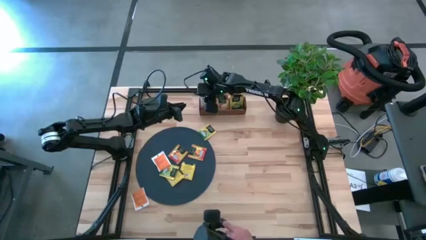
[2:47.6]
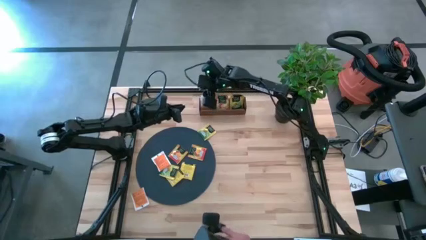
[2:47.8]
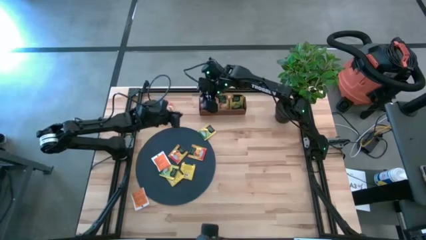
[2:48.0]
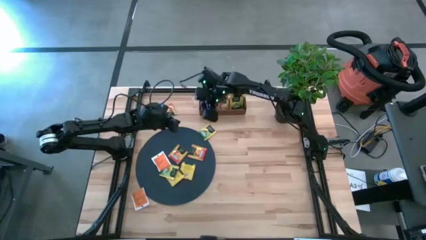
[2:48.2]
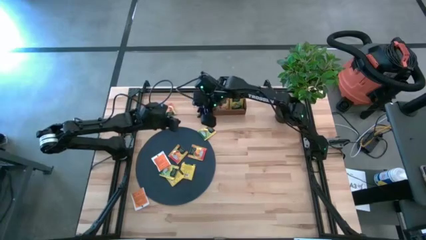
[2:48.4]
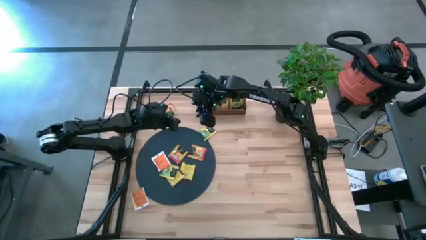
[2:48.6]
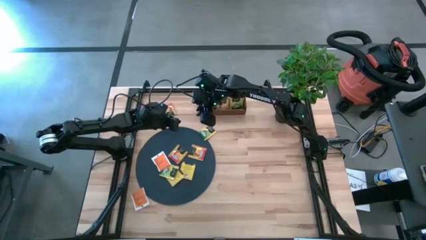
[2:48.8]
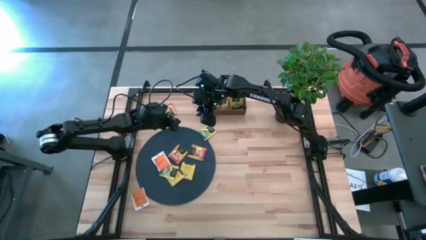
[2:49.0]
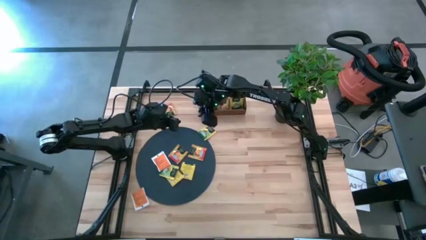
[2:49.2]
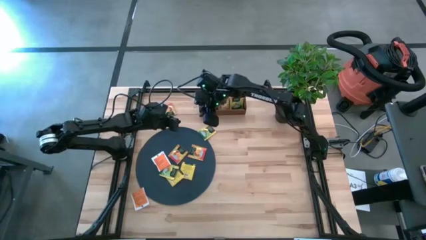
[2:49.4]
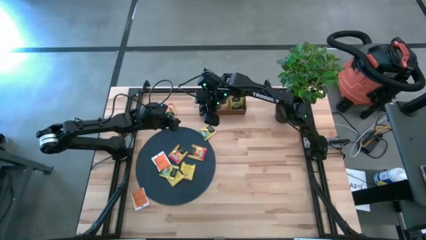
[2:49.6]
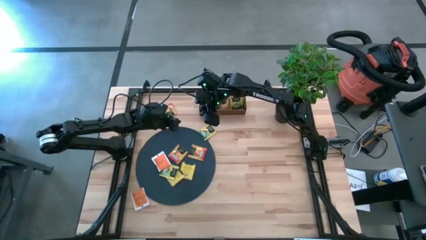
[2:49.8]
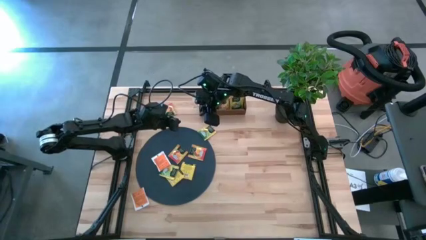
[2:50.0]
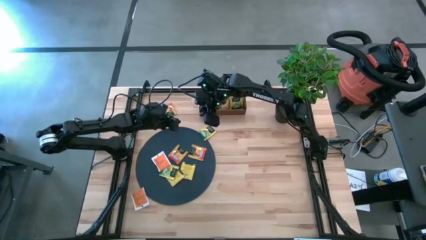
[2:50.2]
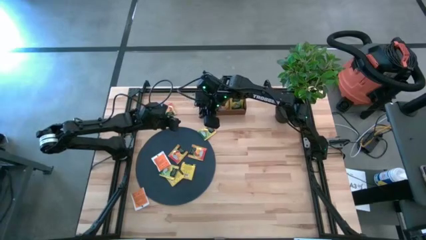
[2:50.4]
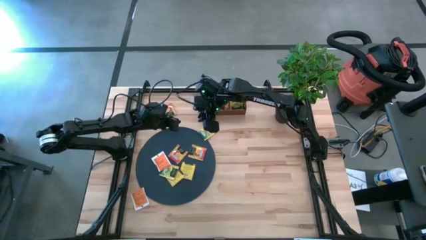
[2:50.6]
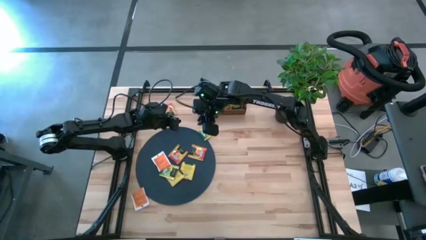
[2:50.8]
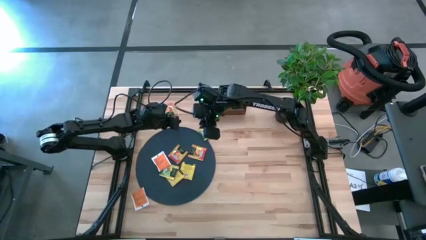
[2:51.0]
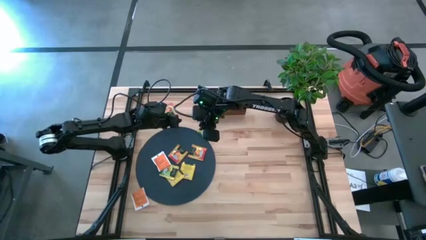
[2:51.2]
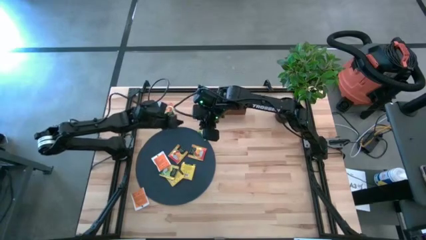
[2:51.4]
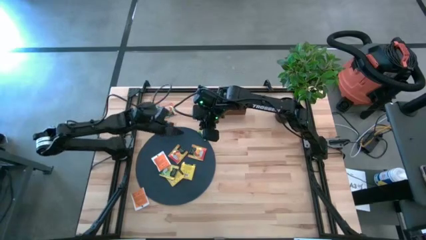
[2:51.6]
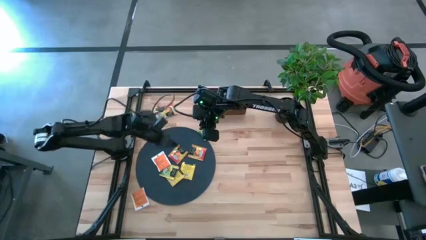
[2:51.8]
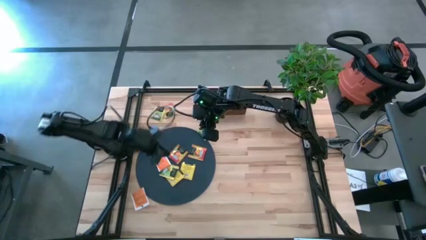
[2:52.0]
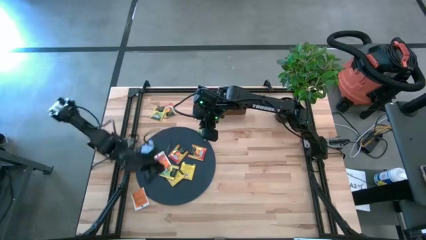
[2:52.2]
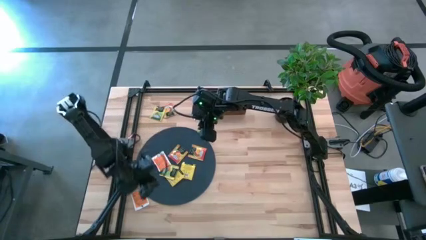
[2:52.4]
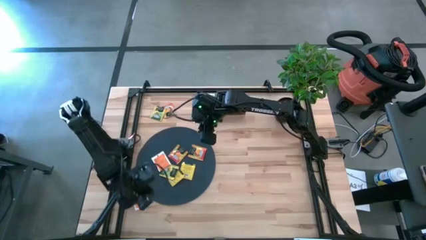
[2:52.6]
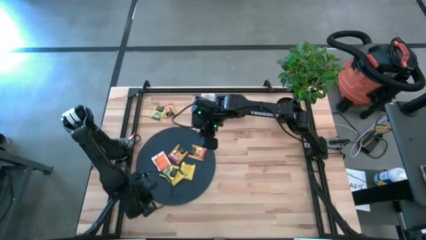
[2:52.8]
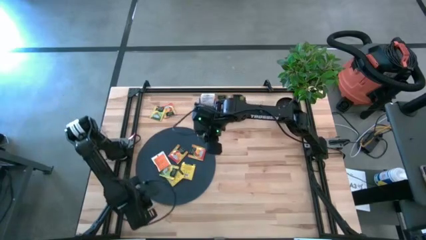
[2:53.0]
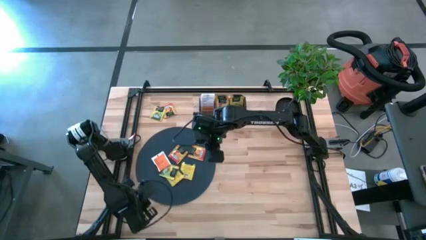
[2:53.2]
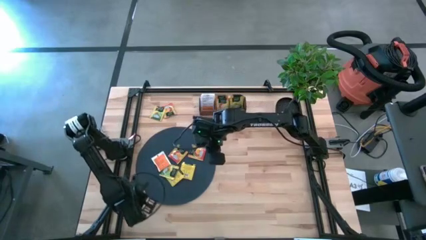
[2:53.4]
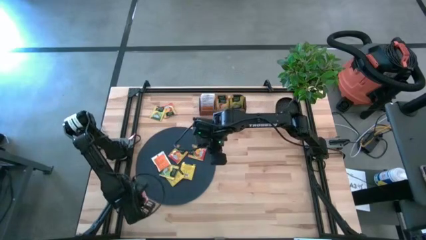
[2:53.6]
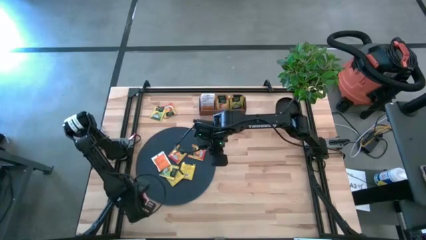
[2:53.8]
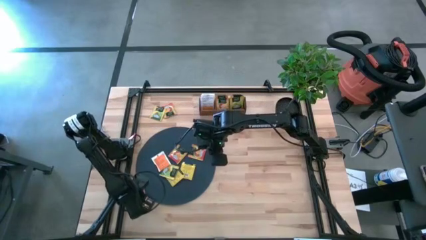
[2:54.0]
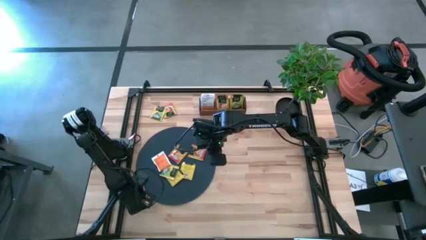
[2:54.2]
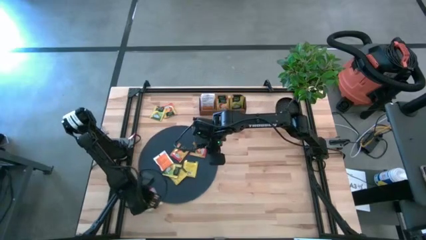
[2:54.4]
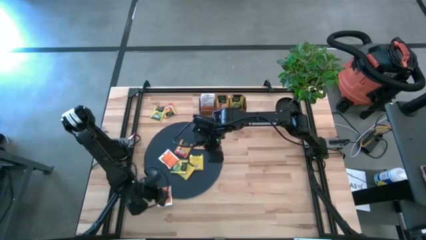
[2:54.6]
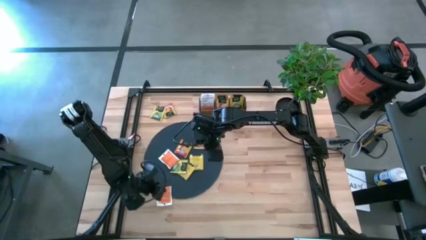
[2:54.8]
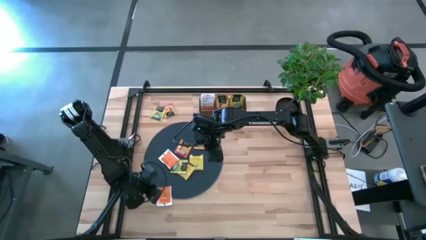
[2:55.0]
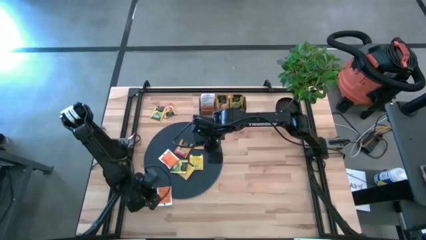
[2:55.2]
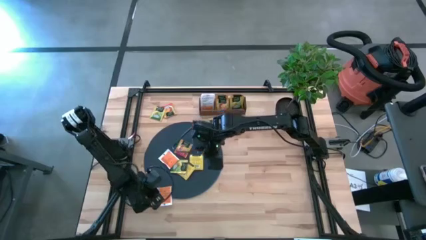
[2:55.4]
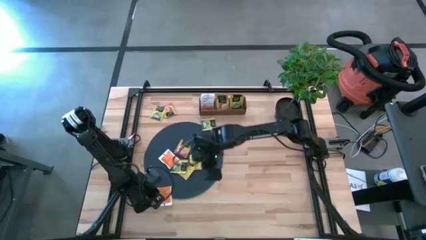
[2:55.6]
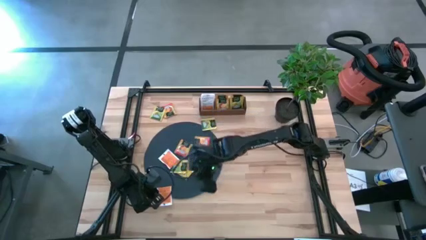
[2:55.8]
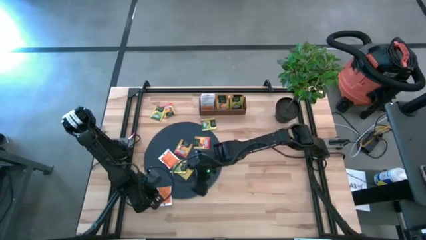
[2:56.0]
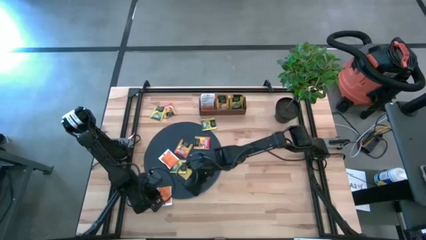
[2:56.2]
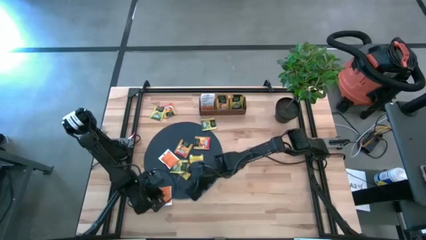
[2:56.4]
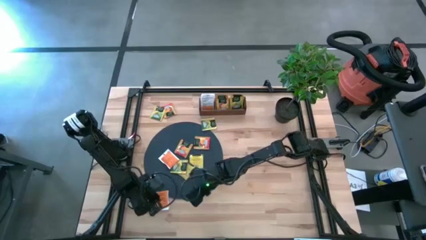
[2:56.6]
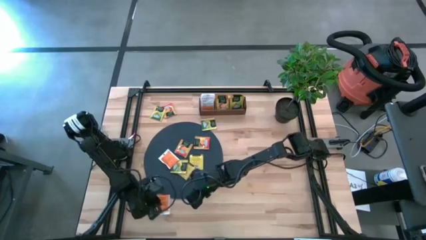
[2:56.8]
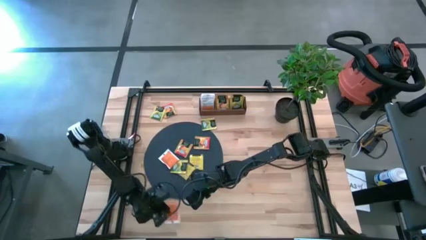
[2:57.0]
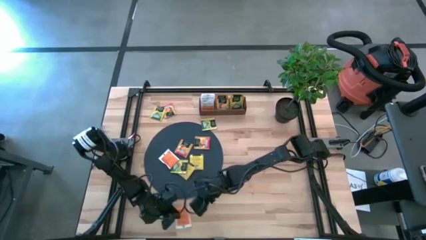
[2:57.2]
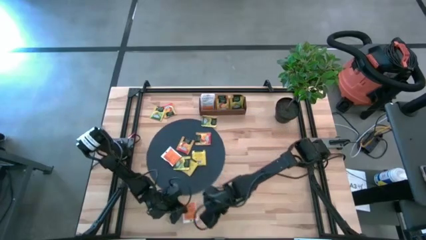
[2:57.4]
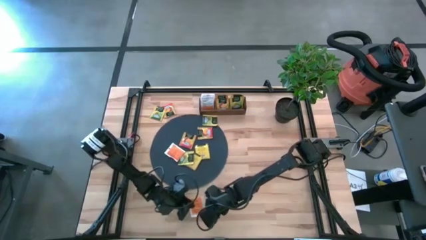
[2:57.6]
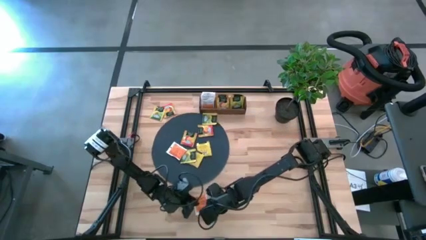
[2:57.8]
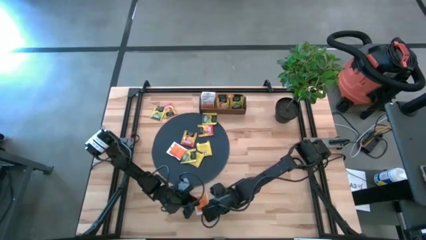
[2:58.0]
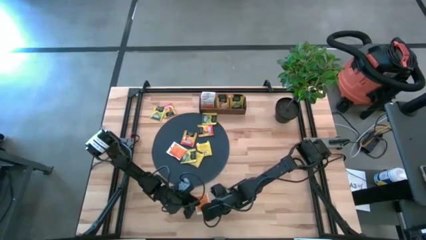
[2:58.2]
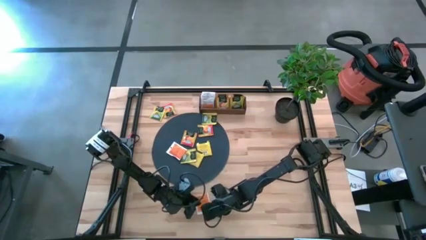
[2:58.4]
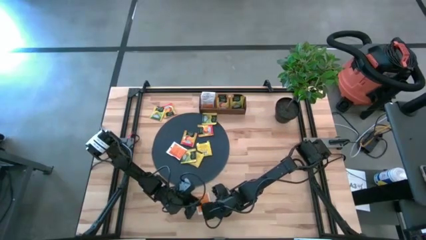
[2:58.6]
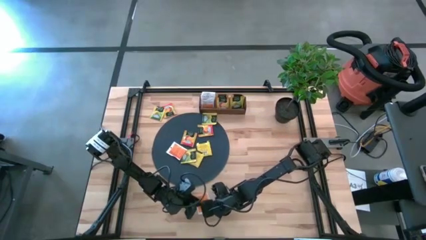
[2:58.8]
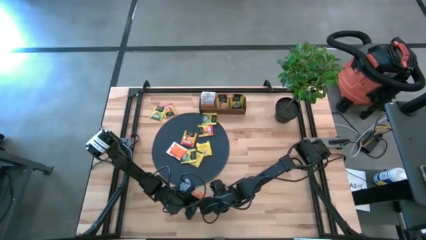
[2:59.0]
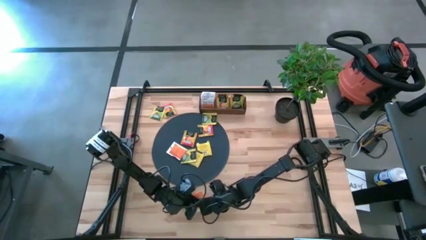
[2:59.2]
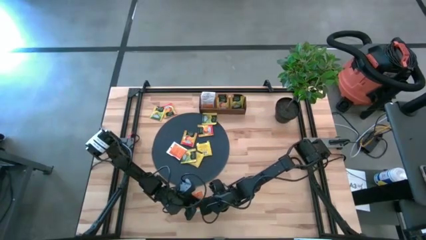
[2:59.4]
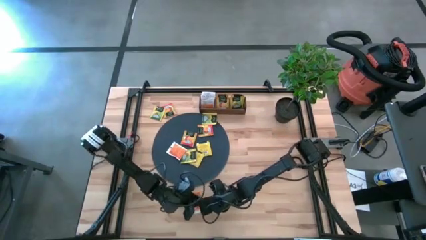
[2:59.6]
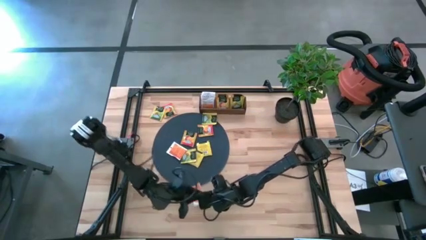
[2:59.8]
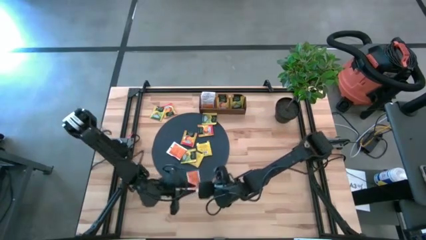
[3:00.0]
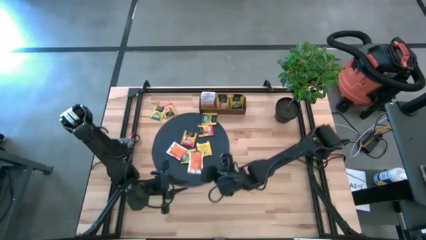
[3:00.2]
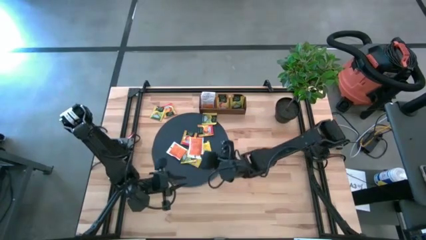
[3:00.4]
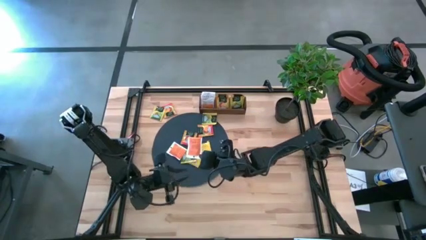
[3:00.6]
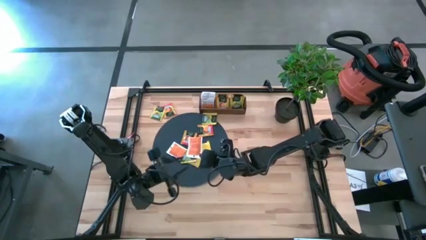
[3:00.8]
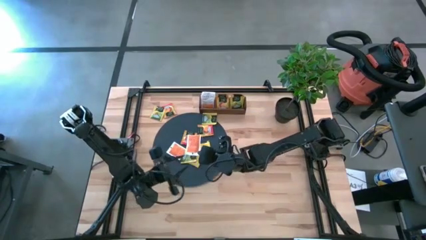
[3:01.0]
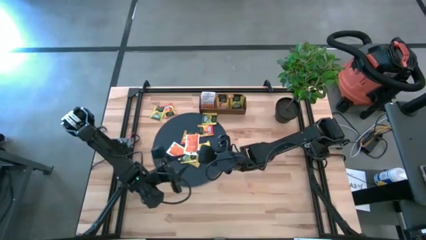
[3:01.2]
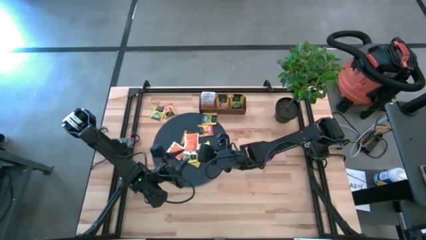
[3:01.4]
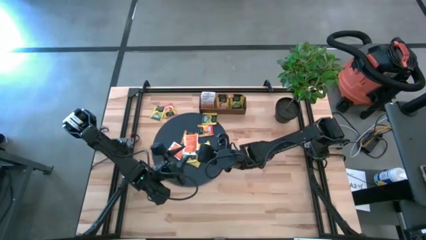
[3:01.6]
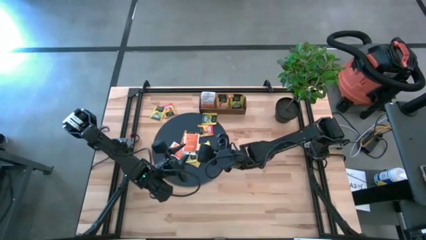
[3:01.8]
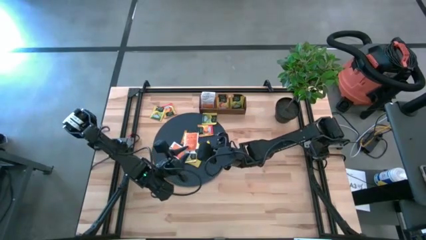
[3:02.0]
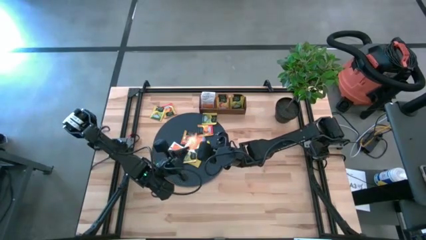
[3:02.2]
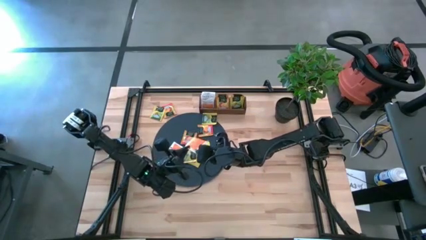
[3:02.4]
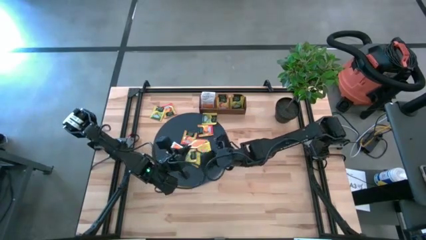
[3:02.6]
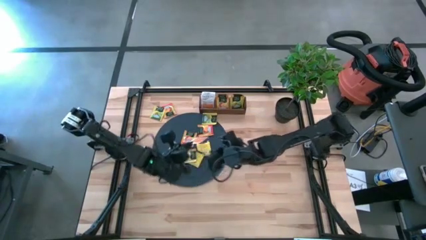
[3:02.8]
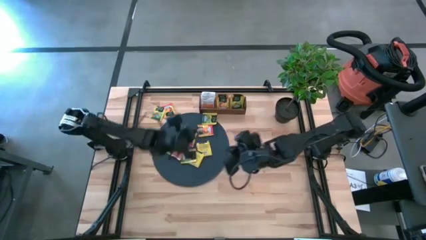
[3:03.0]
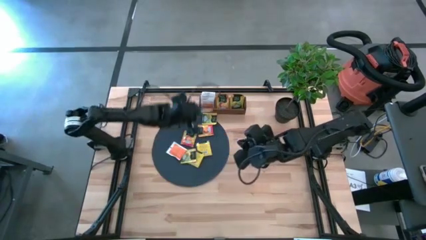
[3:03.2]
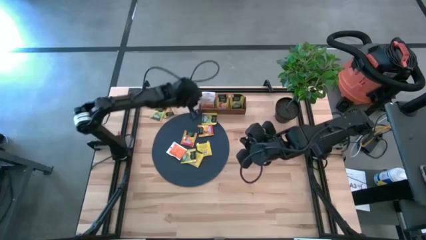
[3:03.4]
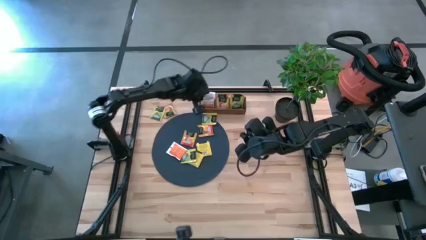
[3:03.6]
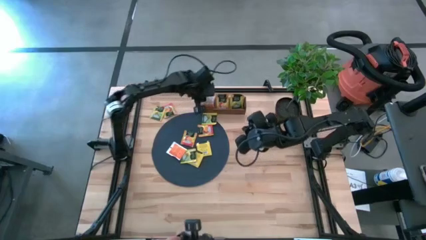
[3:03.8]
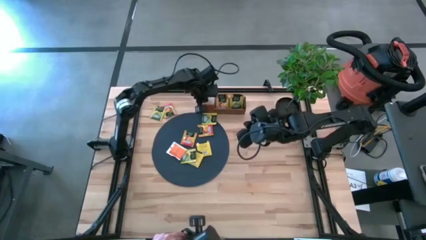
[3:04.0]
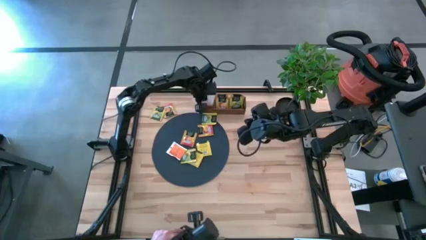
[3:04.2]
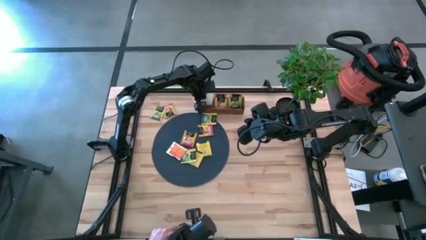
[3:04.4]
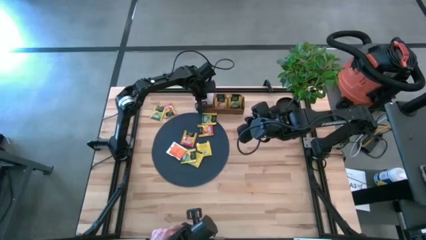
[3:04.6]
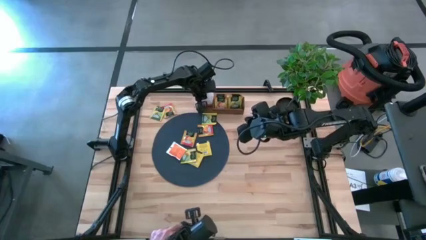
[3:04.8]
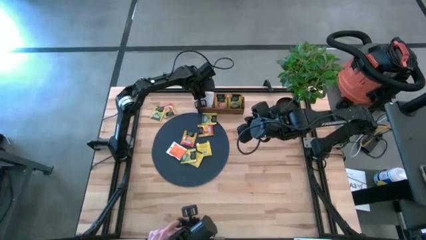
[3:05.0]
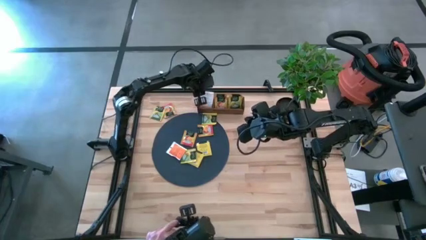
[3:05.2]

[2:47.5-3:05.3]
Task: Pick & Place Tea
Put the orange tea bag into the left section of the wooden organizer
